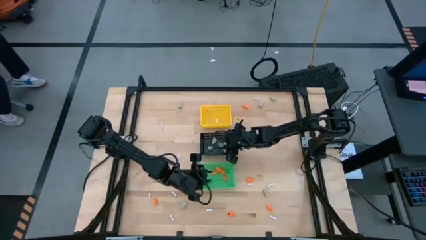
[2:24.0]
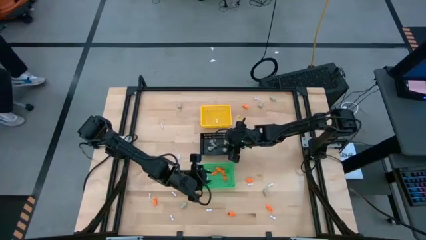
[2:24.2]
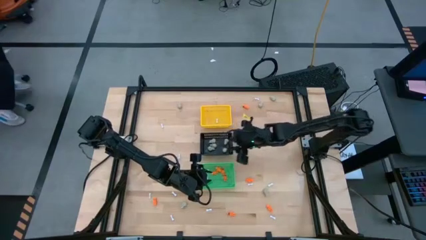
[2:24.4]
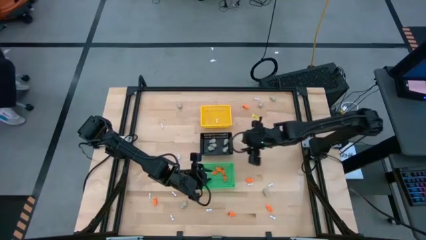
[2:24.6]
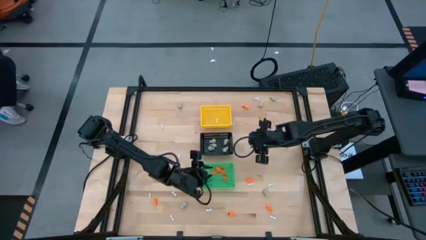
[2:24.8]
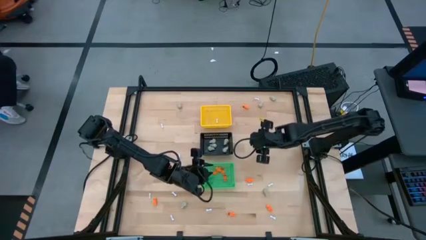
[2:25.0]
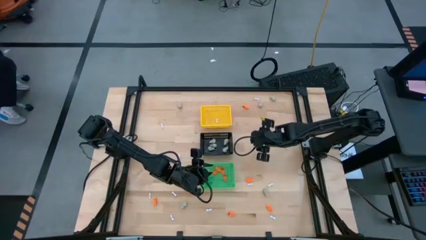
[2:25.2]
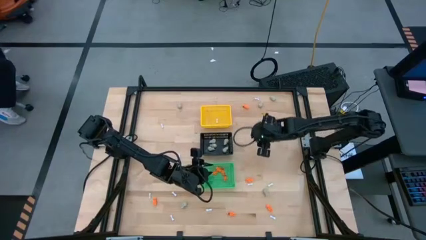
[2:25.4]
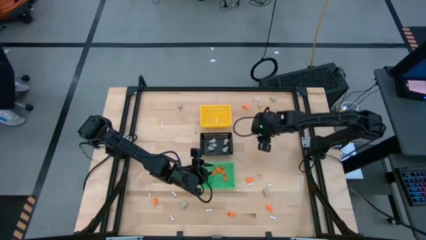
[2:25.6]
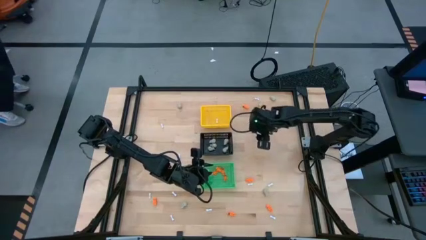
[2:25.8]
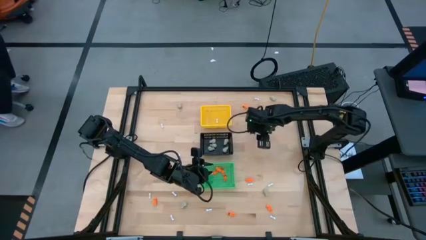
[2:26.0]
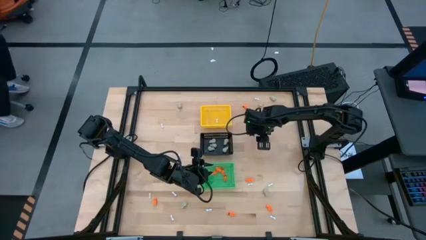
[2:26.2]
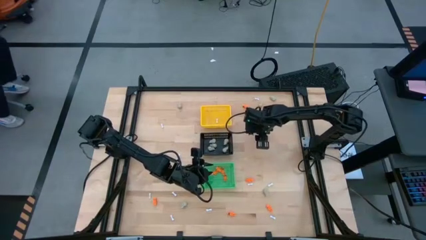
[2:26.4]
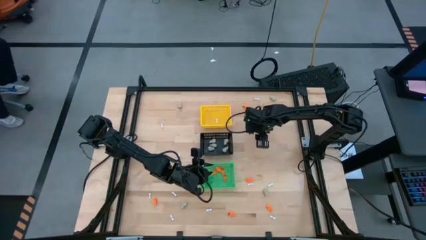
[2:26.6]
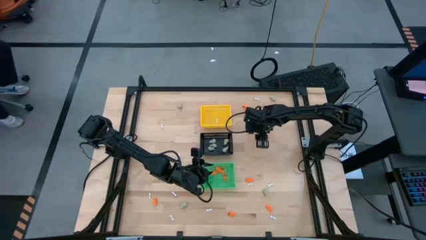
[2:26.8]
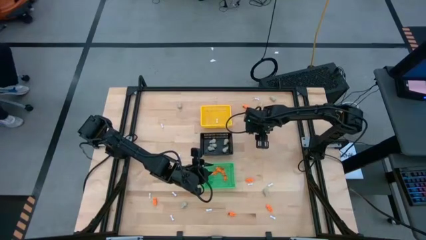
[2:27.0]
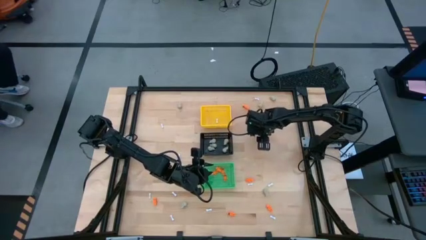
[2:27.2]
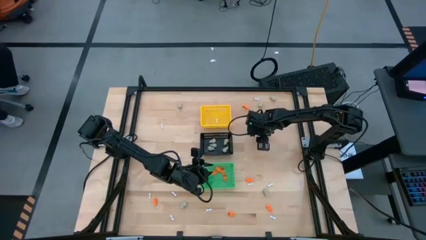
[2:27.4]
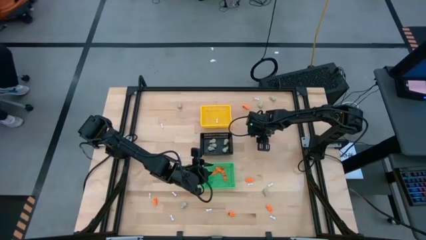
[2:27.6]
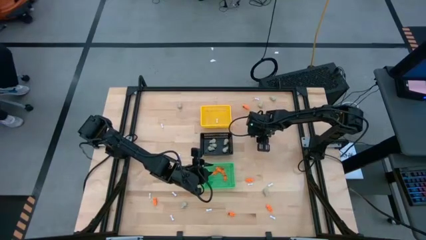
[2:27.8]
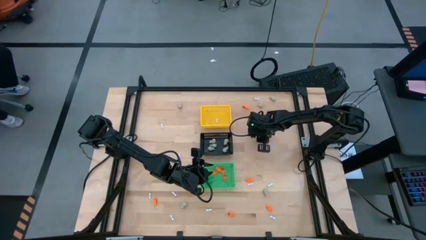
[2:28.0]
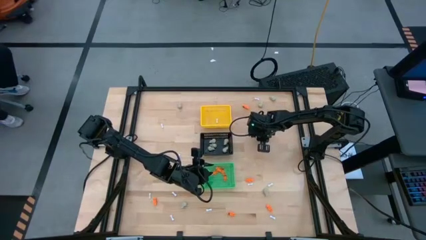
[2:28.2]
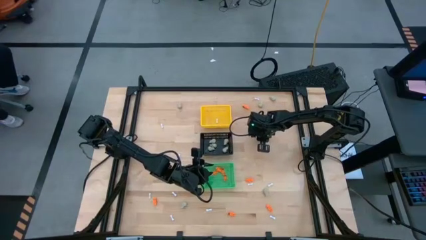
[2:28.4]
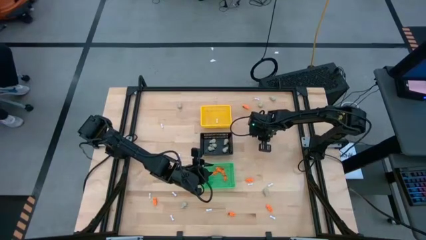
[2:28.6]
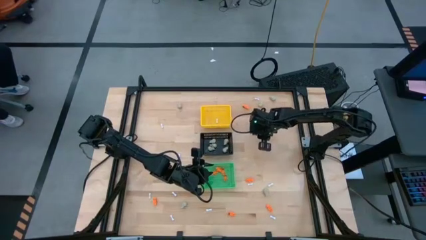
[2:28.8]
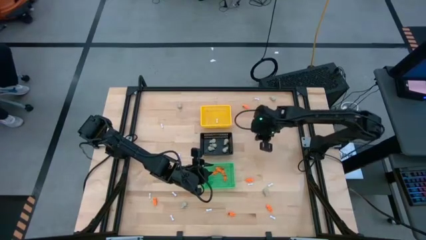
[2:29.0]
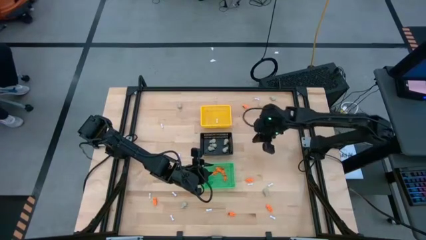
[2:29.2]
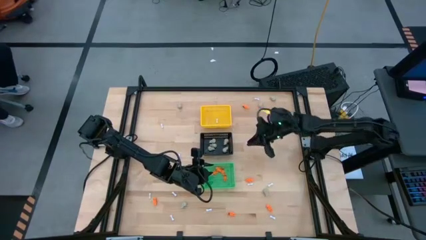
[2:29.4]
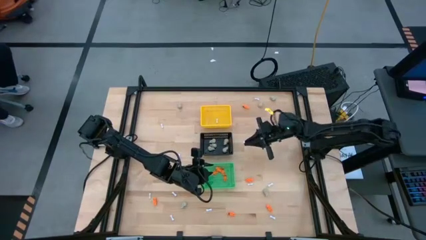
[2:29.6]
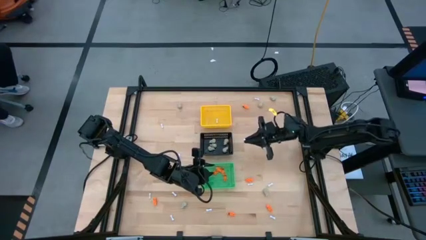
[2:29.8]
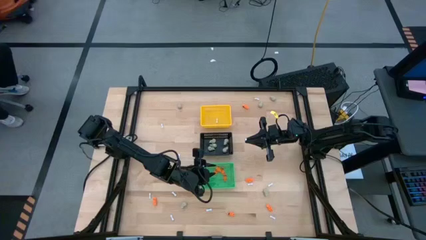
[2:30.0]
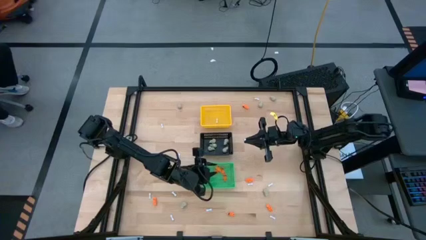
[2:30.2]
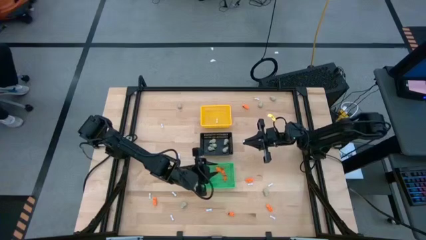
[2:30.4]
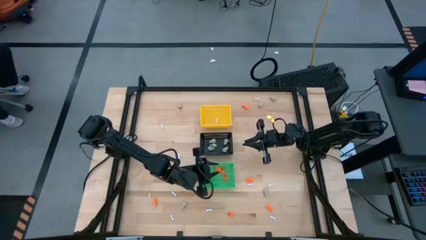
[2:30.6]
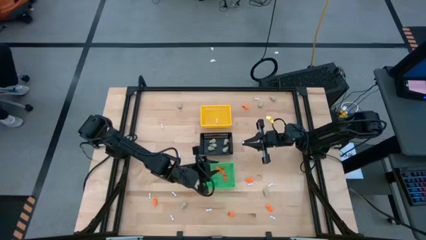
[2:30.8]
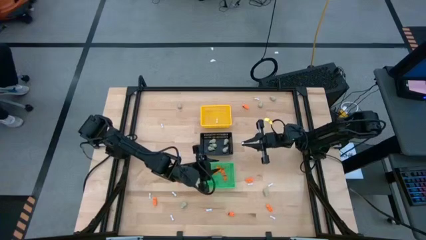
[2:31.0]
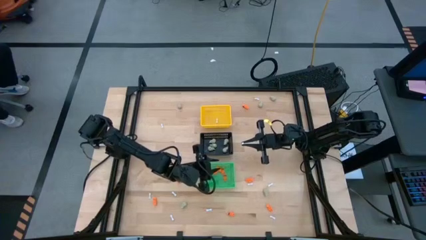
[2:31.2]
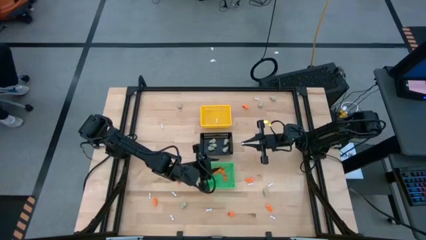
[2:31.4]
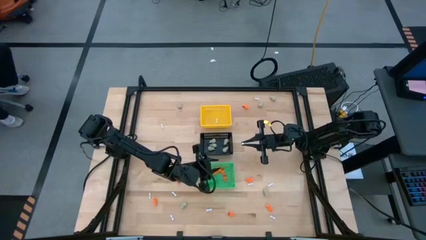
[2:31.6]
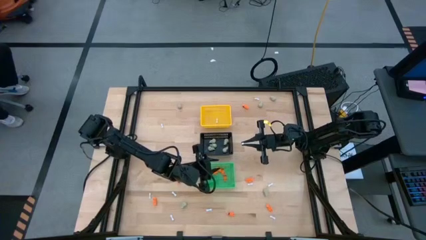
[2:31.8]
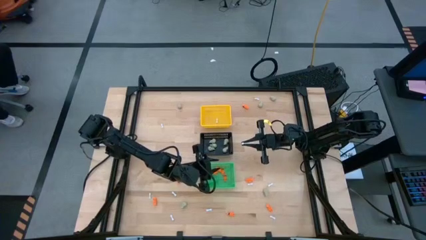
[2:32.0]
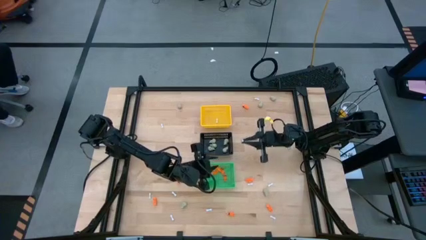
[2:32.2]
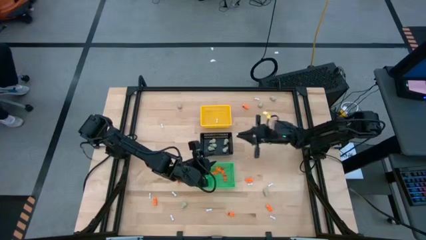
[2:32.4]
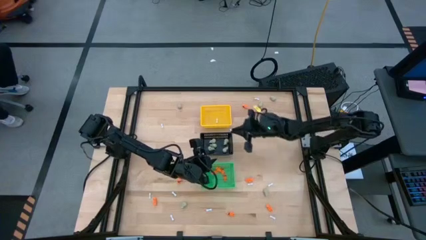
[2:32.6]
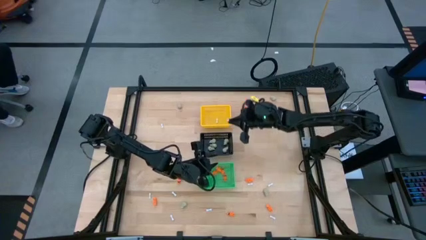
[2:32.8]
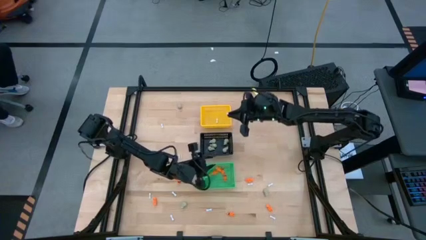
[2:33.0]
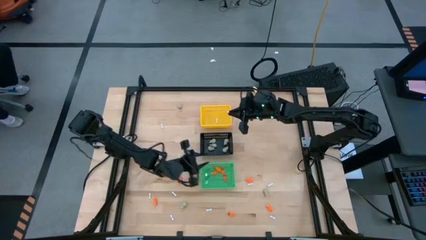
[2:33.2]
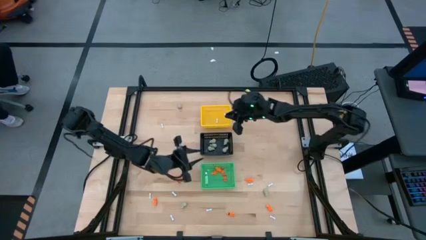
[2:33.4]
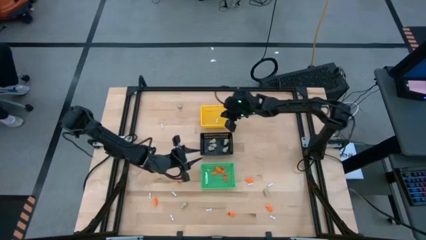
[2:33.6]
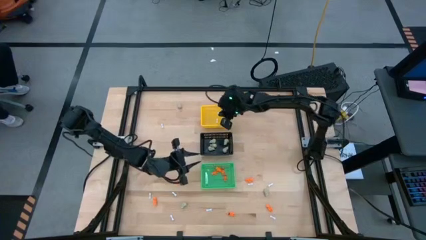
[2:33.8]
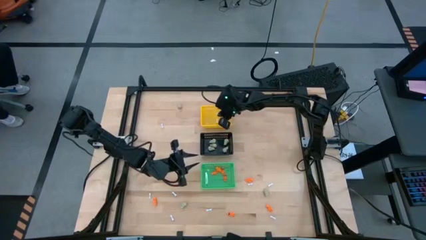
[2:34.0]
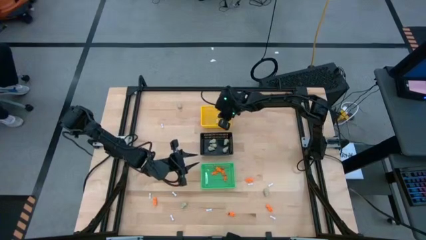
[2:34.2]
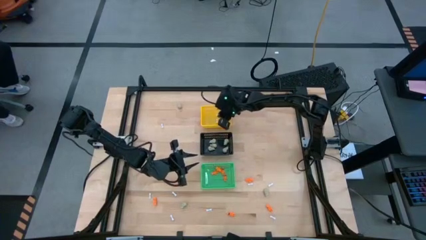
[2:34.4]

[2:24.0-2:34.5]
Task: Sort Halloween decoration
Put the white bone toy into the yellow basket
